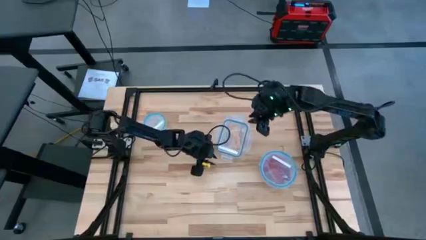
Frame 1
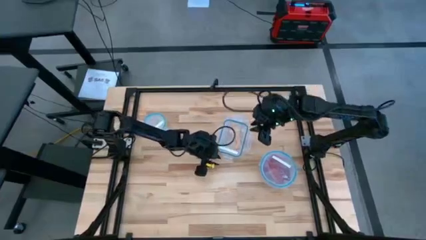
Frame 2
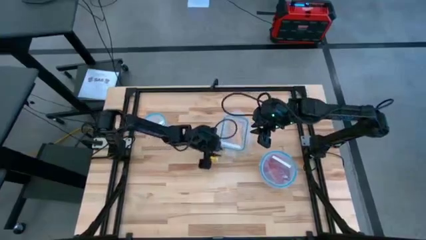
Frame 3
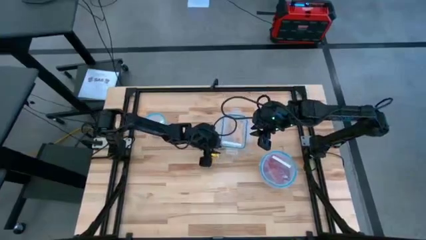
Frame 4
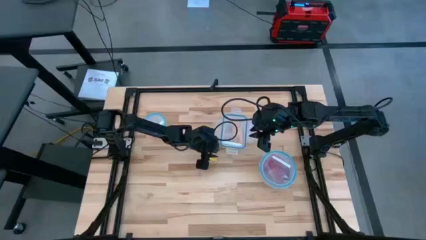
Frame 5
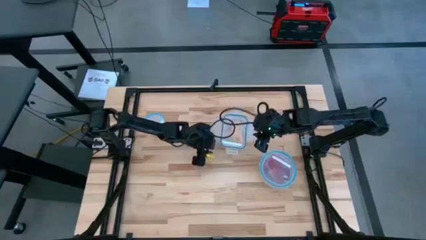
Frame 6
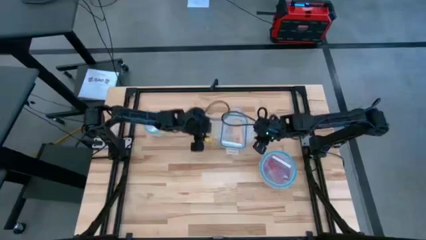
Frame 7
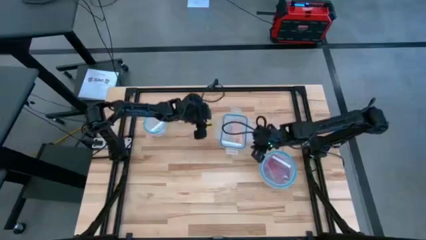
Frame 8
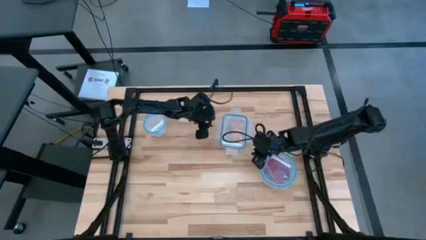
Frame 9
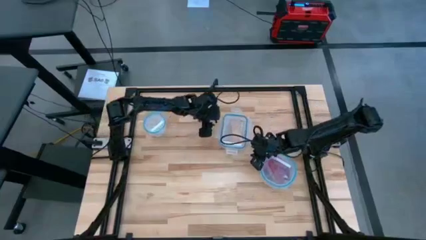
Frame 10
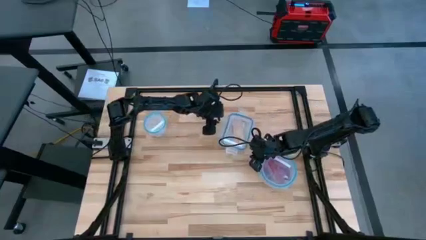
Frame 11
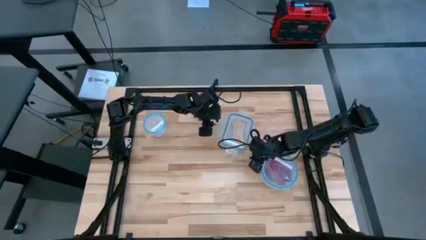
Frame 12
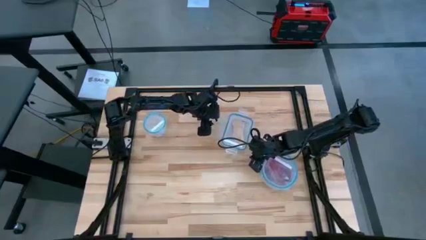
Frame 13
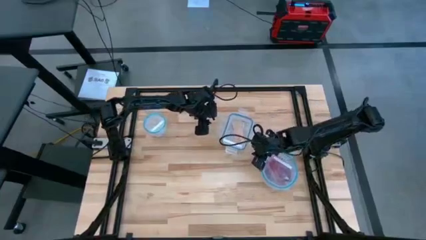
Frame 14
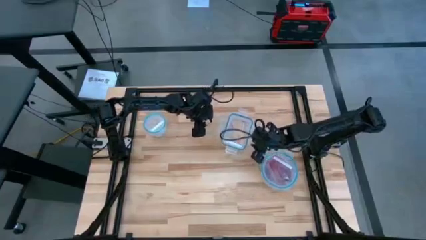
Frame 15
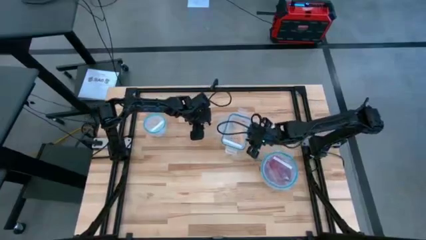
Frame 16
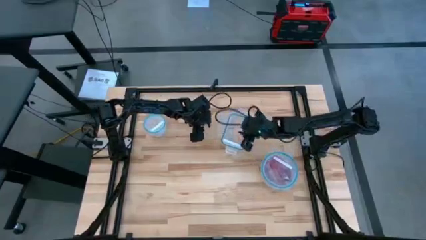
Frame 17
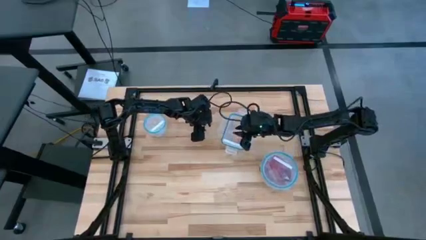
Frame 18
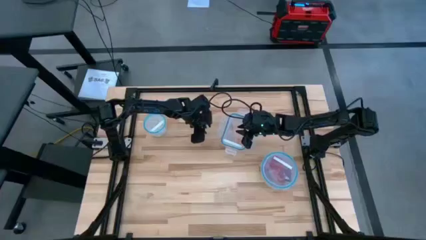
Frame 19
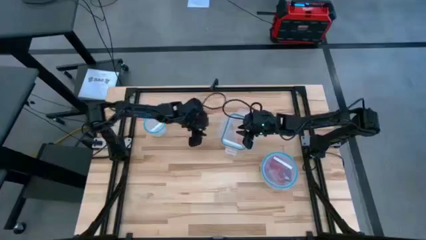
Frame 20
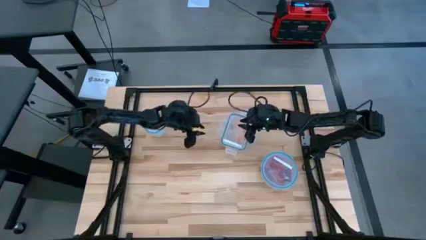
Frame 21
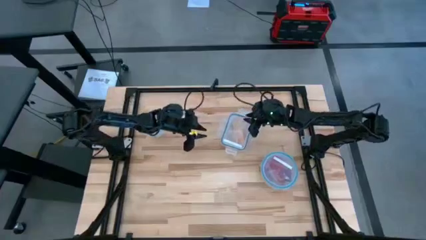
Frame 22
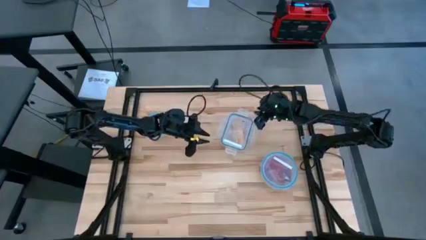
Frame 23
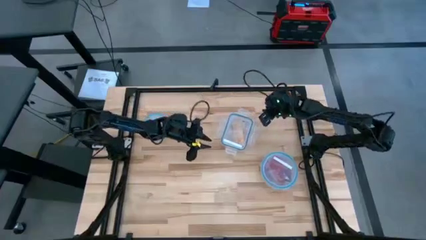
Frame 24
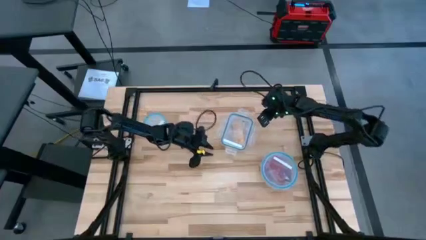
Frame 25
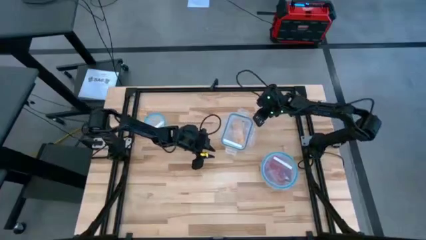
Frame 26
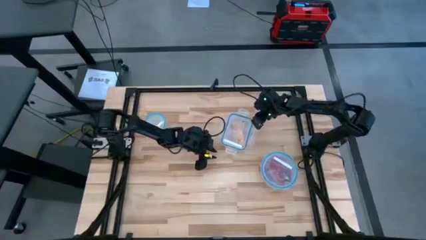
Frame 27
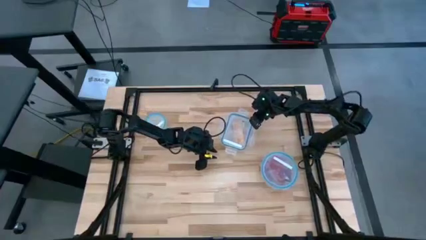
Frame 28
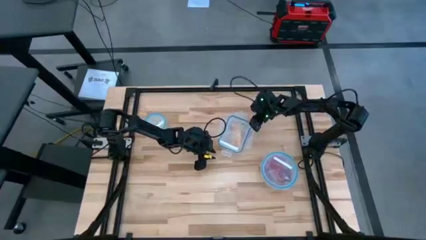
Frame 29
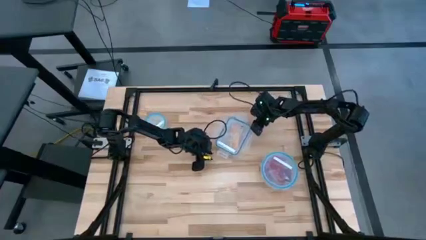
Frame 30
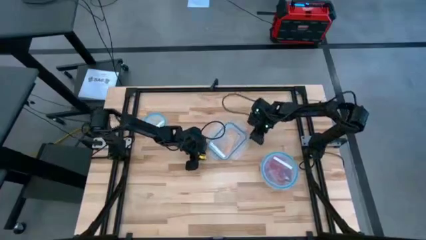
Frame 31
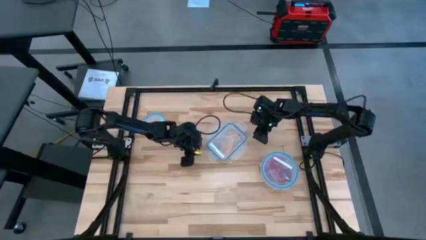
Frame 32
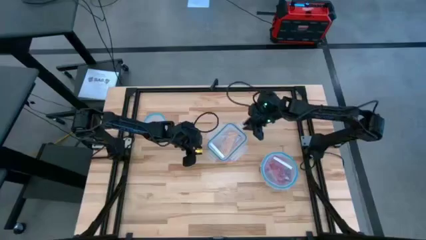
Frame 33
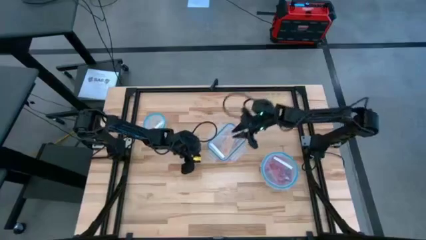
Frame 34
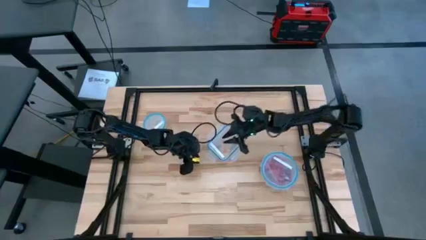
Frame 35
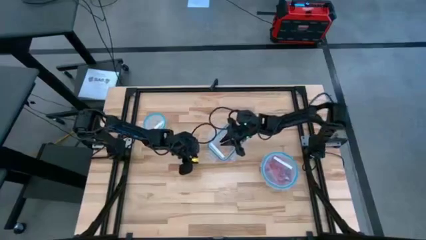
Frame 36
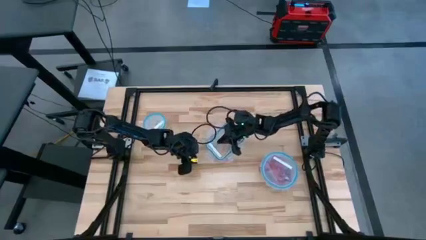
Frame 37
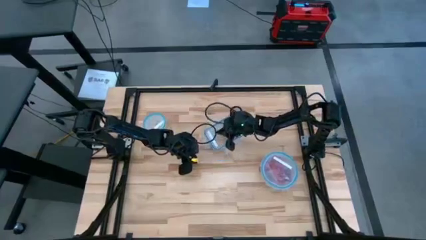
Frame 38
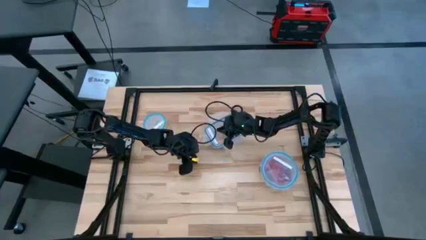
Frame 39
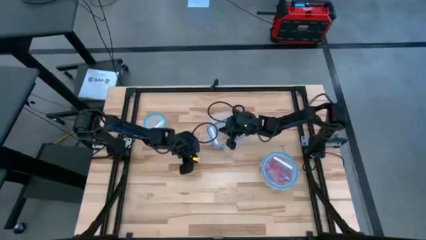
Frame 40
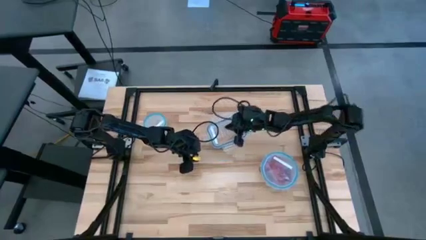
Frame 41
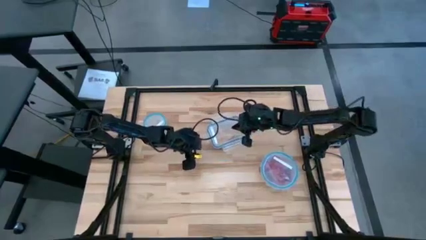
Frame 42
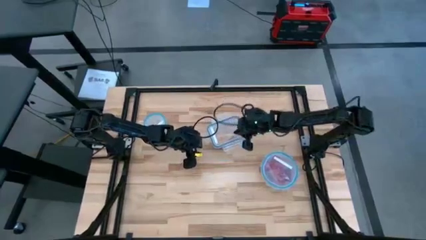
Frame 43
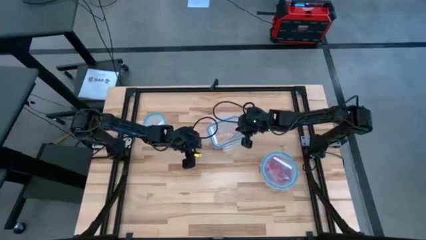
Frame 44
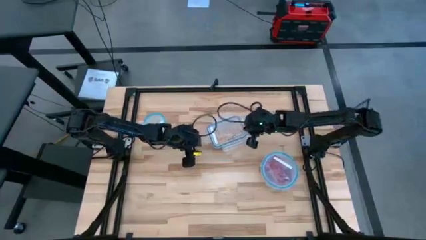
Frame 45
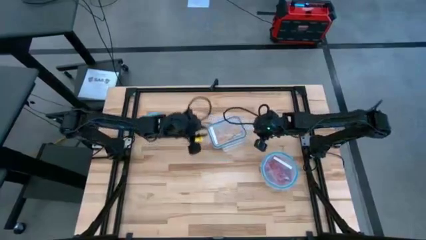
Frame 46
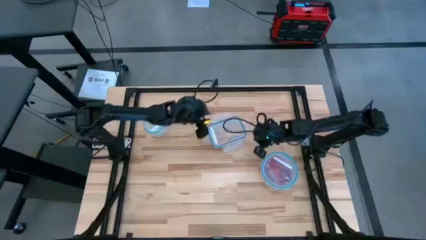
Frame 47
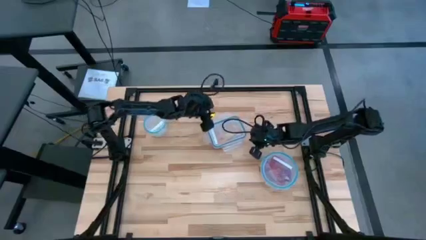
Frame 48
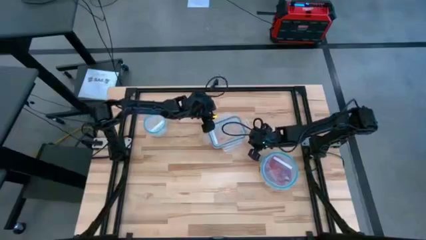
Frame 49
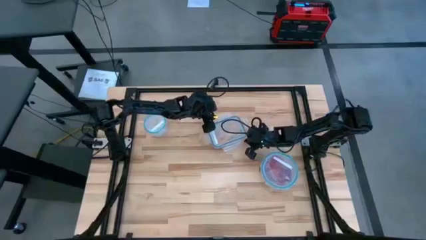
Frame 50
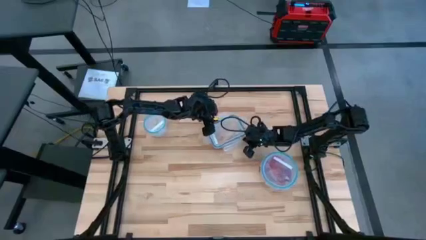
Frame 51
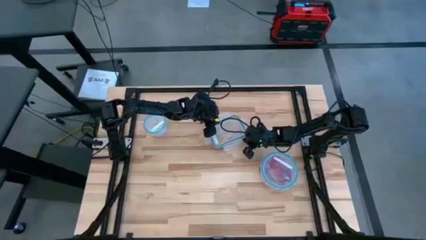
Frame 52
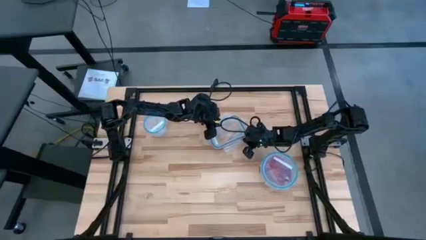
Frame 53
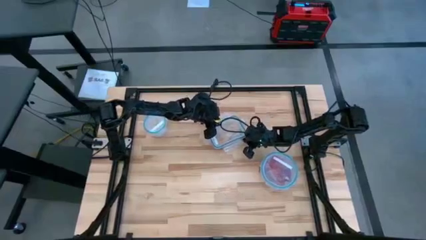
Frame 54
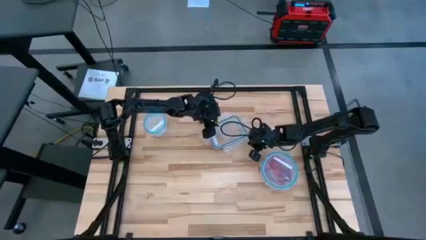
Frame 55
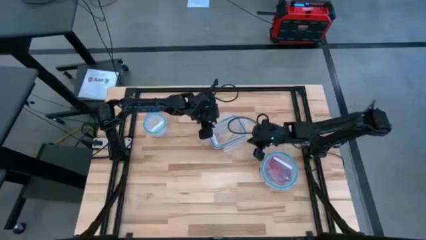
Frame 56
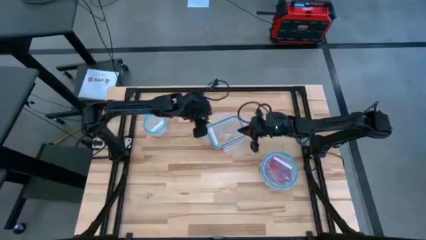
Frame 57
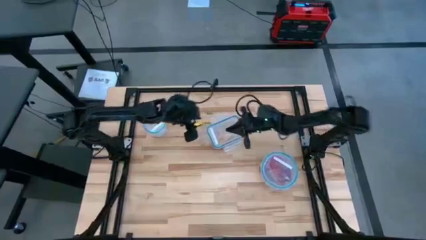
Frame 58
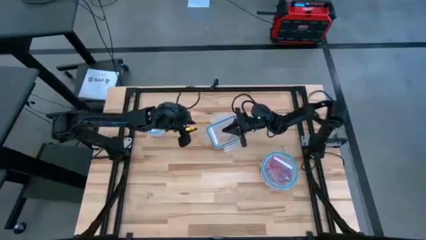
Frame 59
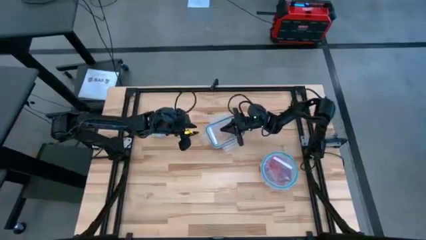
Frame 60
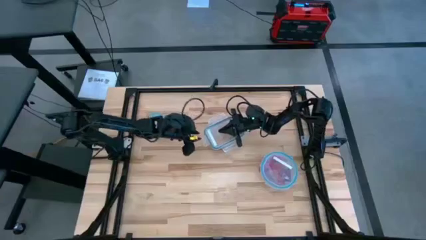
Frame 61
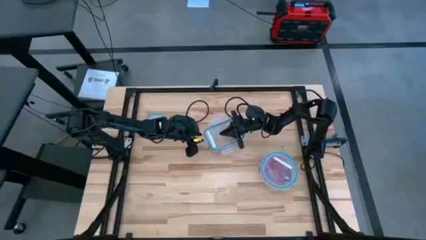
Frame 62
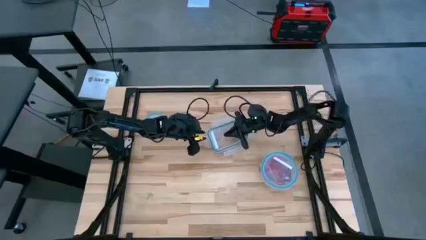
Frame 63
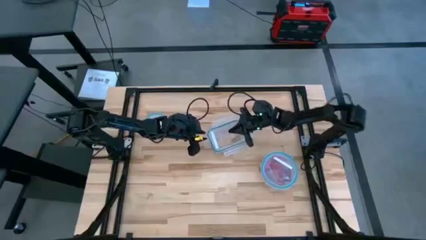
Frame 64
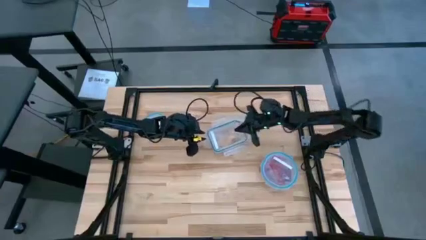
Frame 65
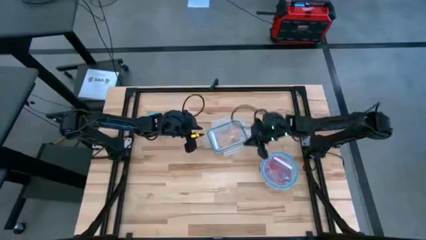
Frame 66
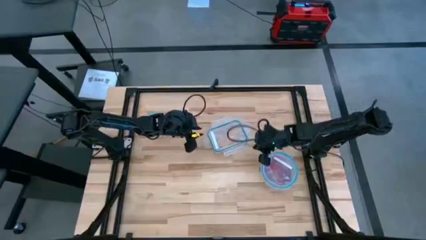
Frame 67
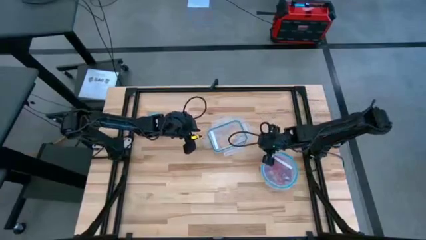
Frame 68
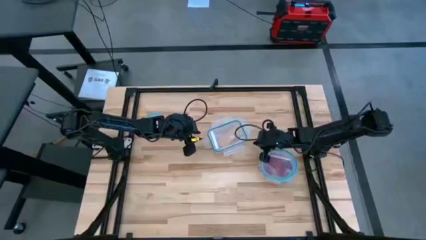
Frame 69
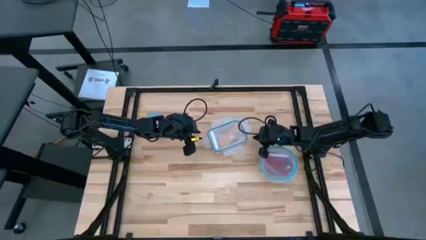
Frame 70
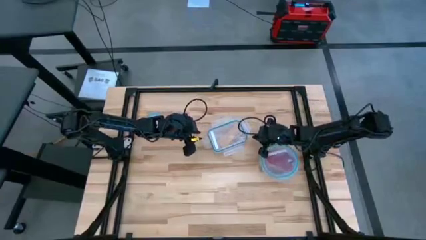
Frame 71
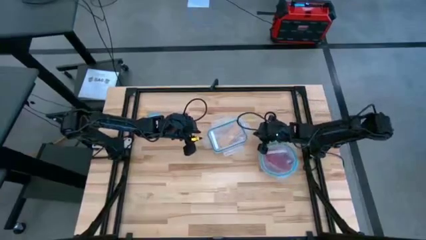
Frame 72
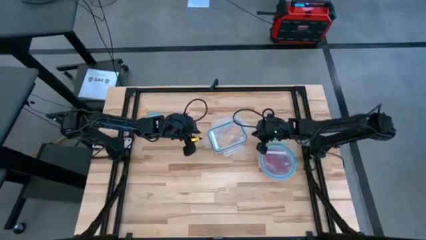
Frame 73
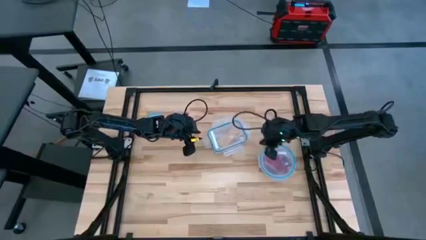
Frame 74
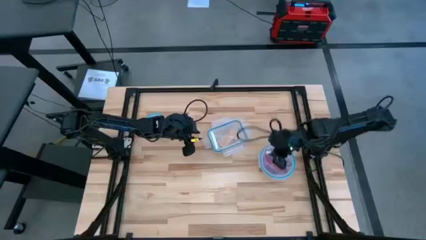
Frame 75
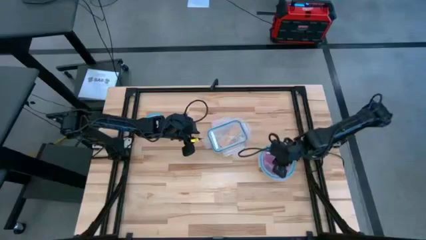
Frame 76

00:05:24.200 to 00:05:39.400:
Task: Sort candy
Close the rectangular transparent bin
